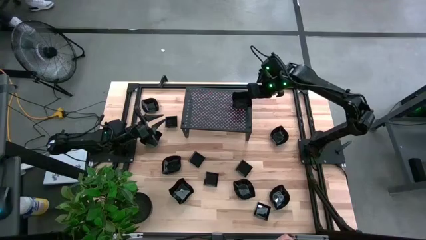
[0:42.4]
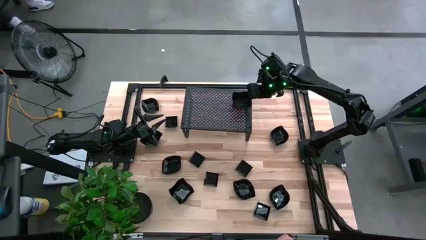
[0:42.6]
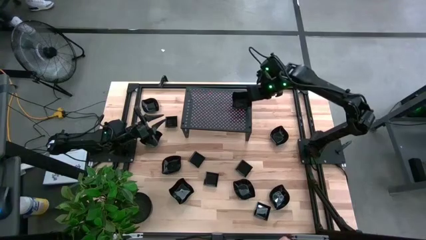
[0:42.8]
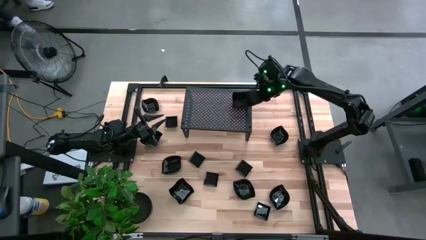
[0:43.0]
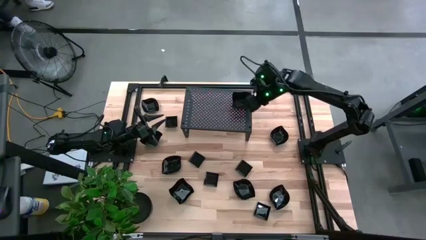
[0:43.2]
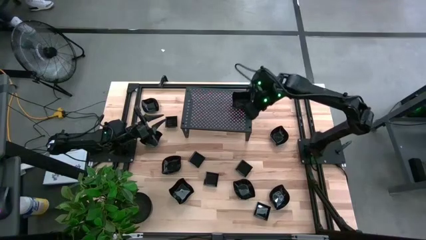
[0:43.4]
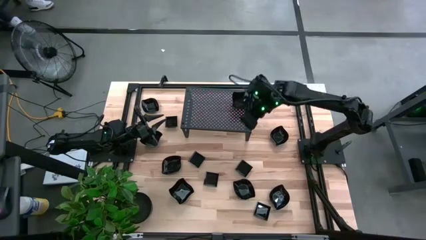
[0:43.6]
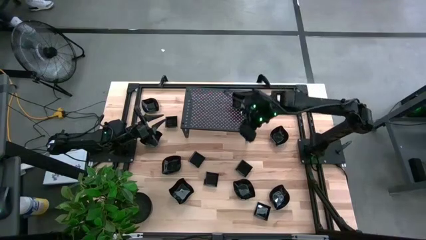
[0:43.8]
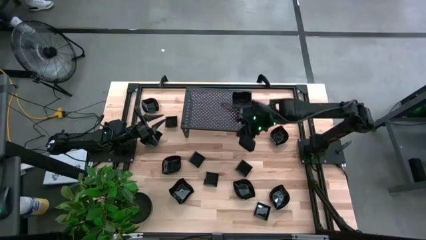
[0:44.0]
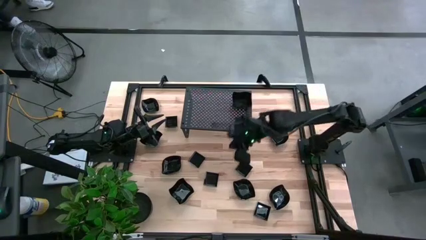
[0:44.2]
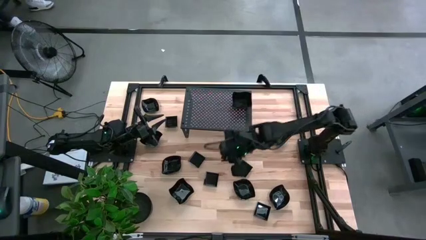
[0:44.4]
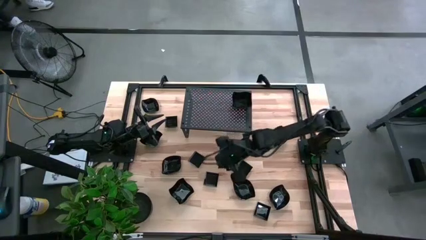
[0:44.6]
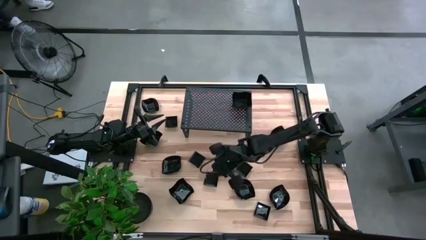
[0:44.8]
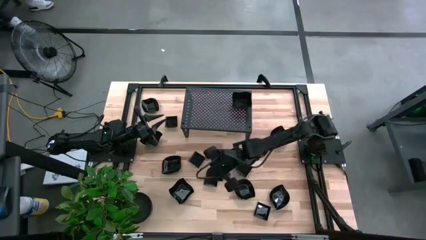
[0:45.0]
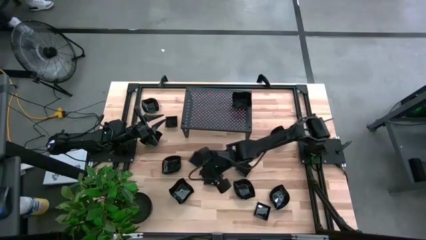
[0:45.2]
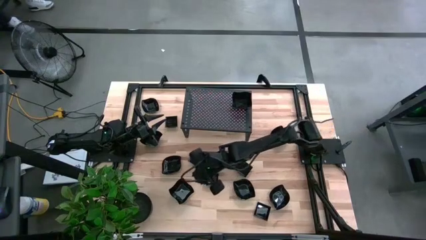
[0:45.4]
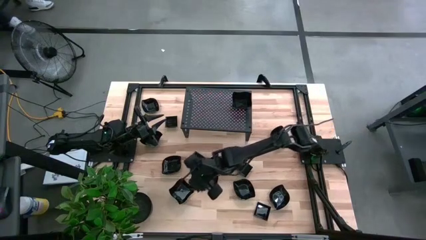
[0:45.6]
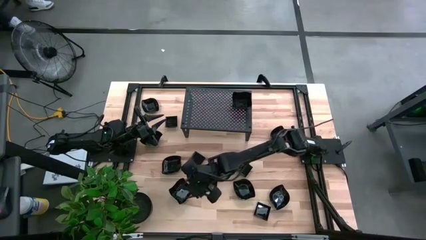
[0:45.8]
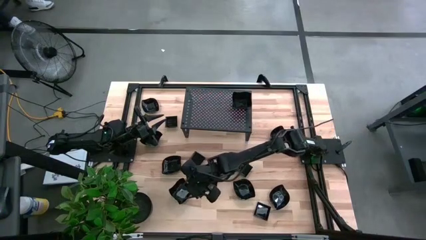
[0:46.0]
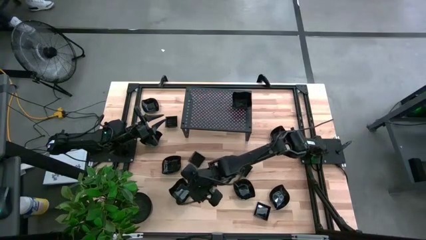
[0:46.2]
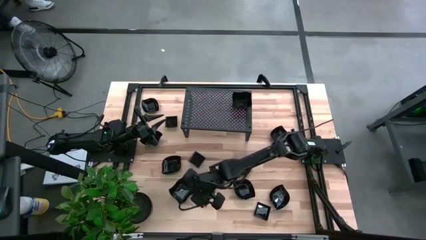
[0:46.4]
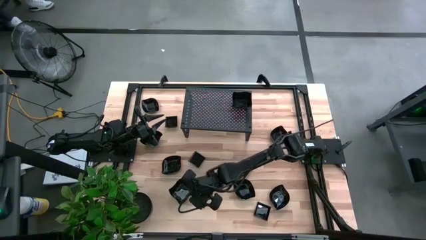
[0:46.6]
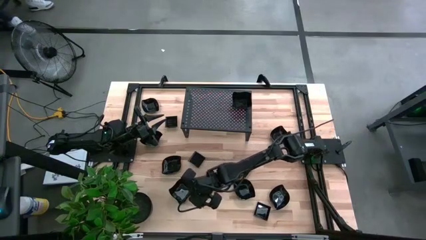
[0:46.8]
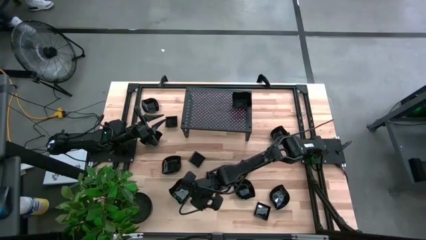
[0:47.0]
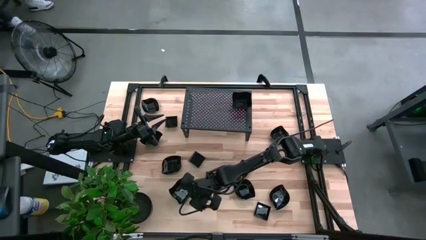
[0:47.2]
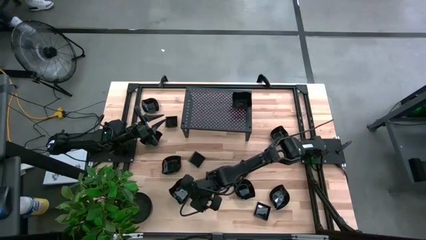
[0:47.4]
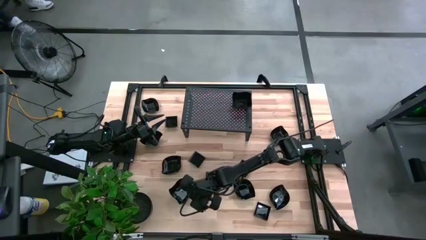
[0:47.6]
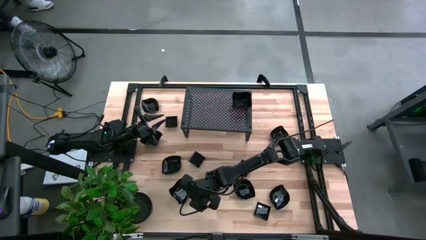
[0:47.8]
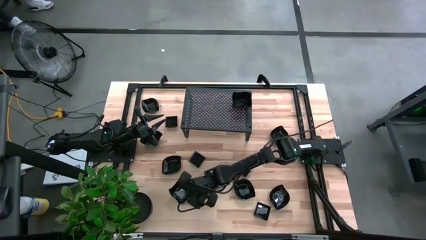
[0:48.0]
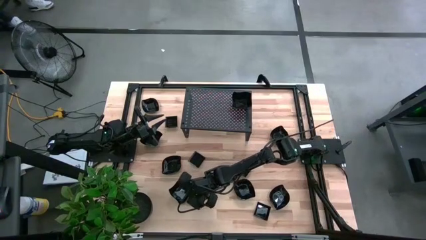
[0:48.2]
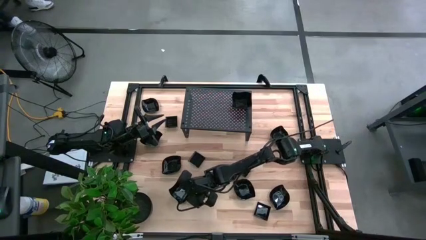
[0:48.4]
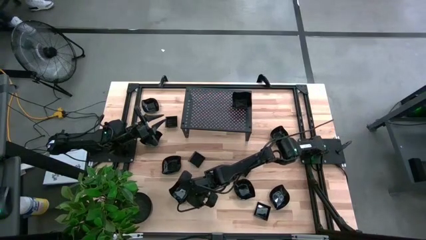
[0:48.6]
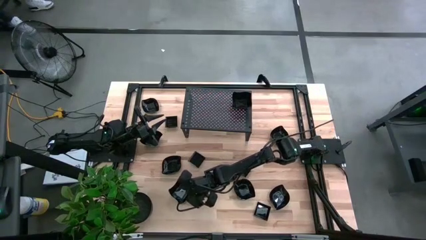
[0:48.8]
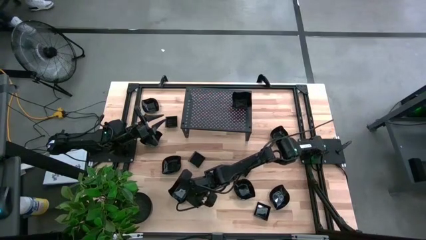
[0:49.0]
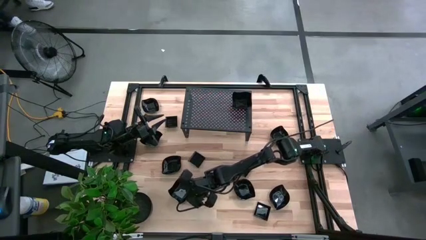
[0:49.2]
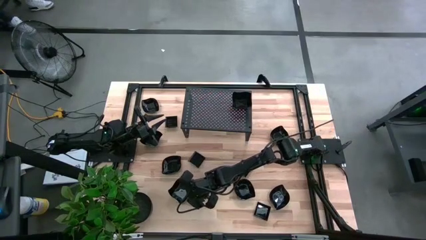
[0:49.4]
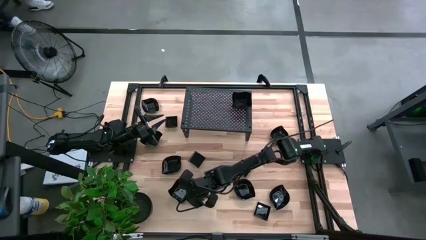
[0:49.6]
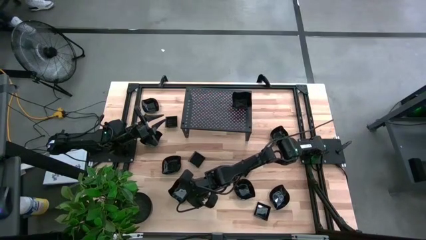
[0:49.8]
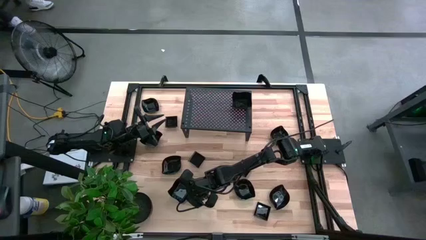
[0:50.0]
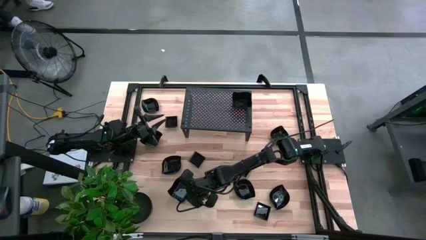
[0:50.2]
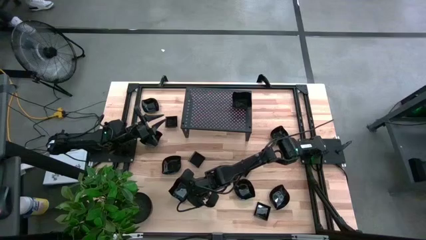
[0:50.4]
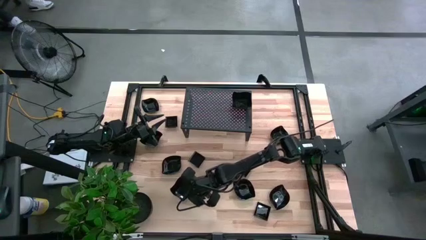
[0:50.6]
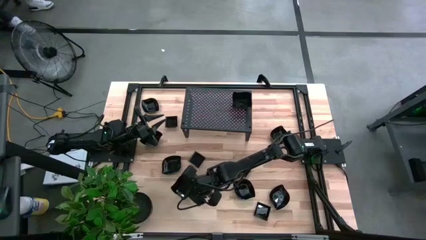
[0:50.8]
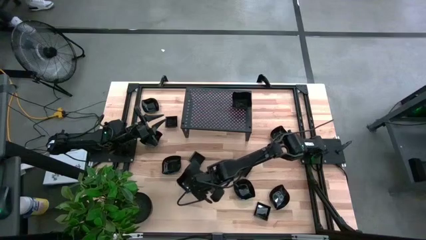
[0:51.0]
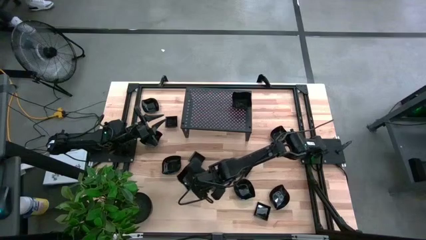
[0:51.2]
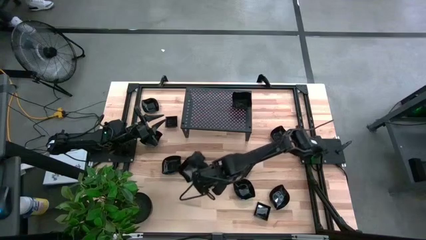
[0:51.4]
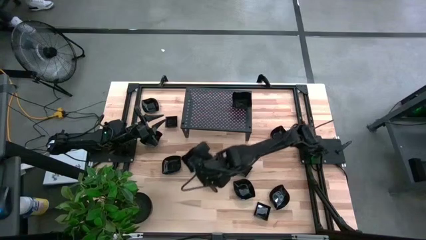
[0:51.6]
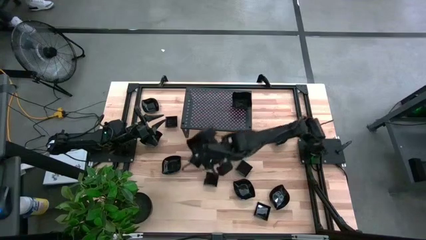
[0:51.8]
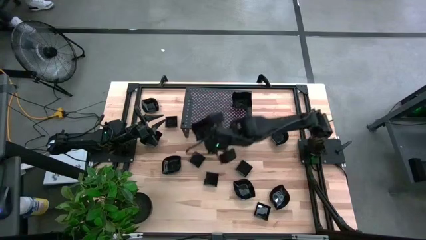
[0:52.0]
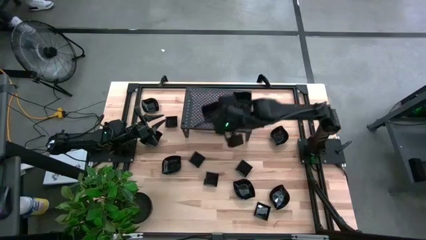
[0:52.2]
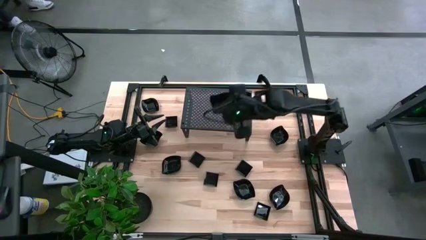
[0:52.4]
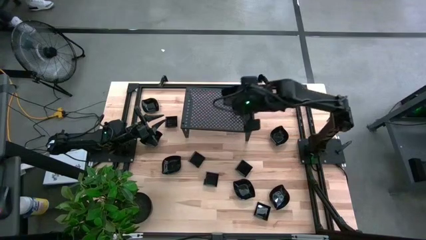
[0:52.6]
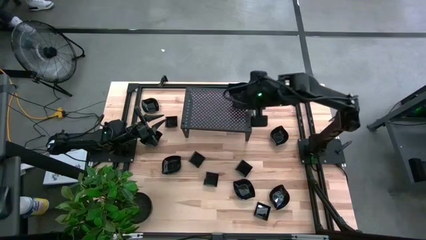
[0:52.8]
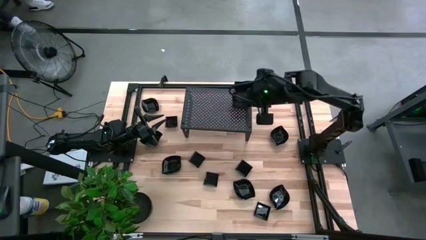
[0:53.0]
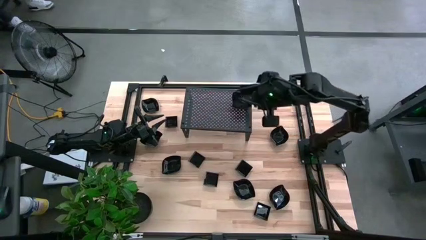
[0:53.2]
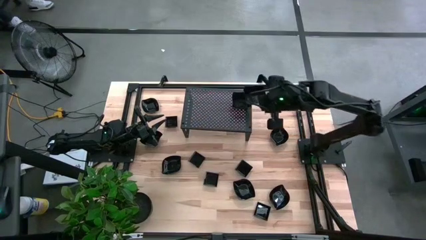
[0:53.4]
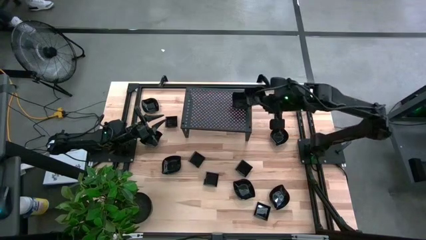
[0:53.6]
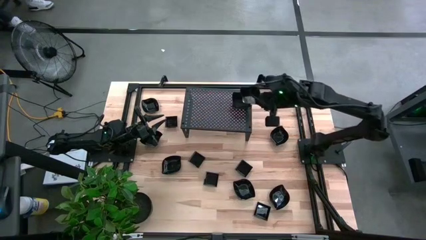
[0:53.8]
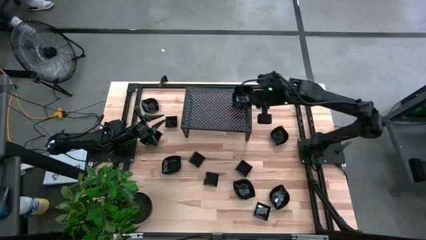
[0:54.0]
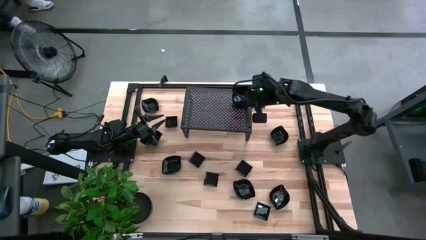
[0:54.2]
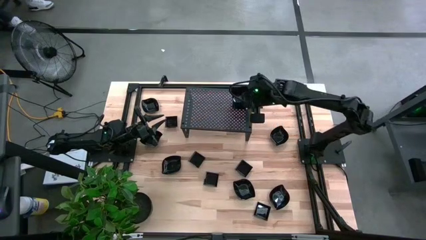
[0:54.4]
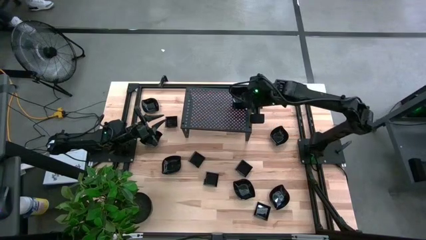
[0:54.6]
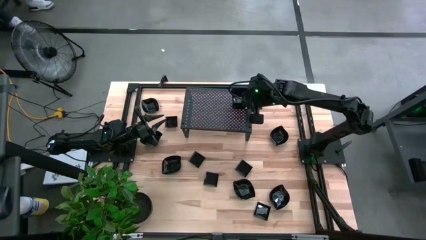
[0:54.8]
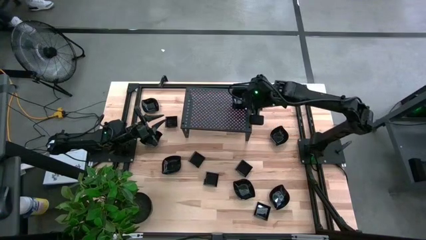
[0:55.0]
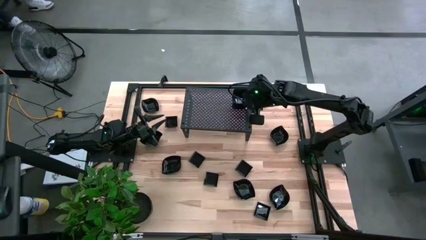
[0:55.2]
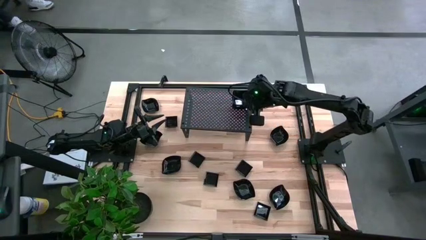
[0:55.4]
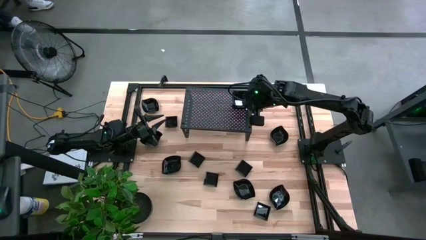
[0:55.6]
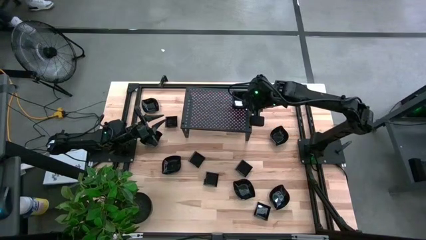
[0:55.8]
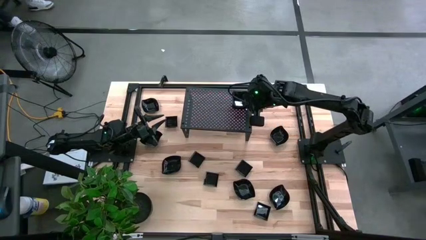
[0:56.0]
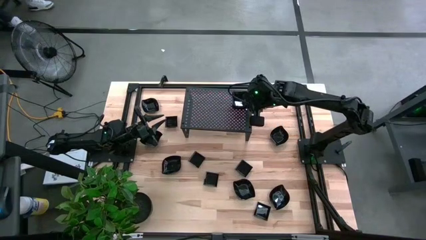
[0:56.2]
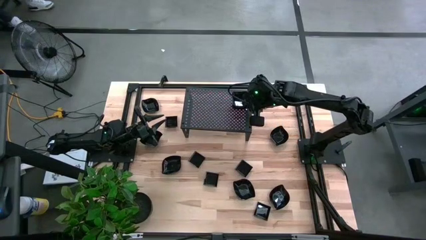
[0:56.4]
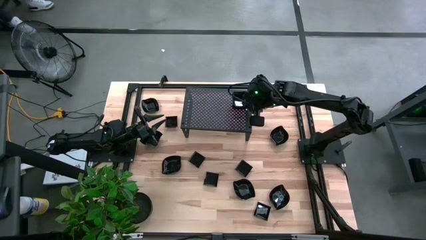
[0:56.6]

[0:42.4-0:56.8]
Task: Pick & Place Mini shaped plates
Stack the distorted square plate on the distorted square plates on the shelf
